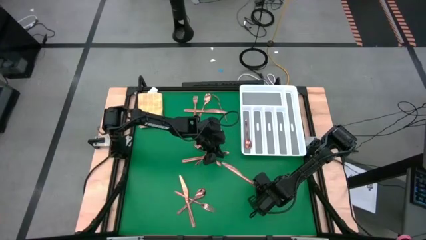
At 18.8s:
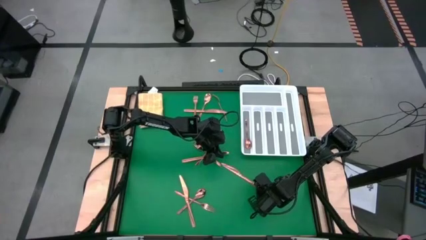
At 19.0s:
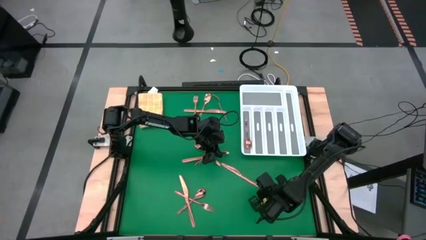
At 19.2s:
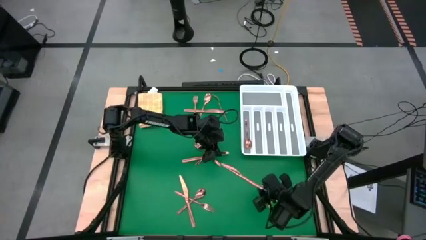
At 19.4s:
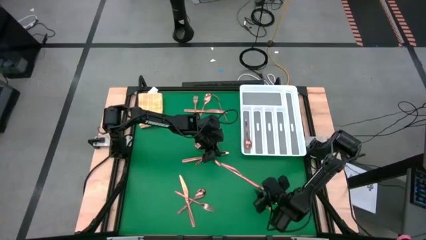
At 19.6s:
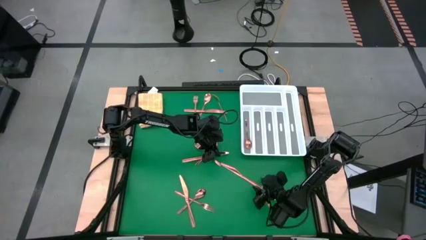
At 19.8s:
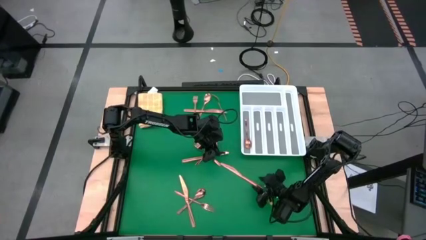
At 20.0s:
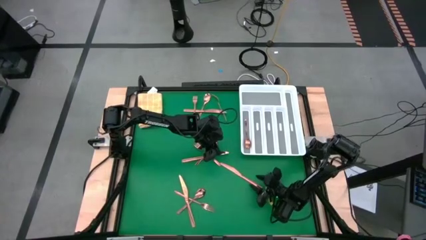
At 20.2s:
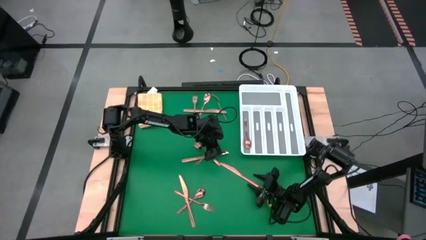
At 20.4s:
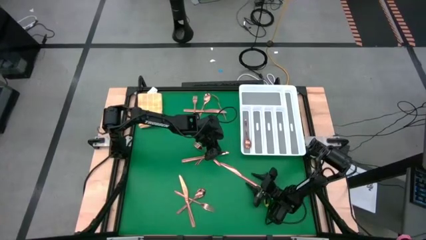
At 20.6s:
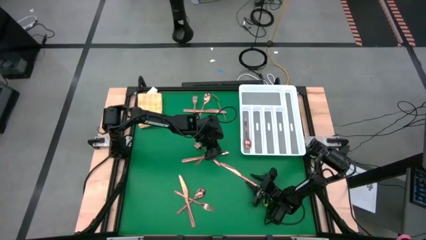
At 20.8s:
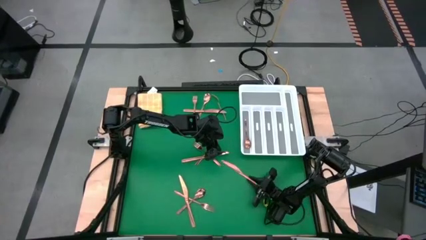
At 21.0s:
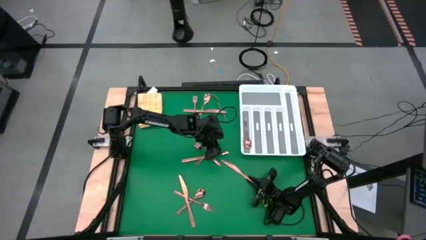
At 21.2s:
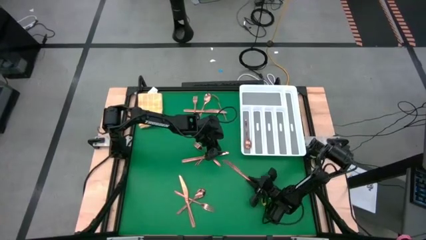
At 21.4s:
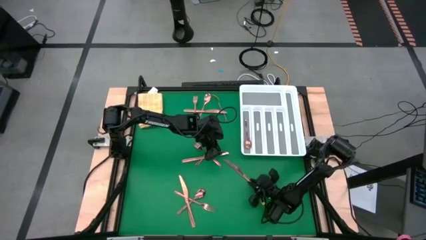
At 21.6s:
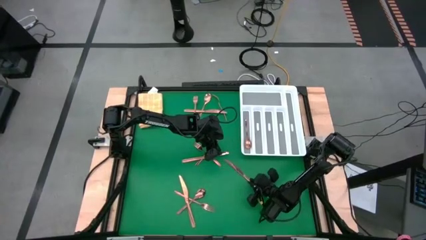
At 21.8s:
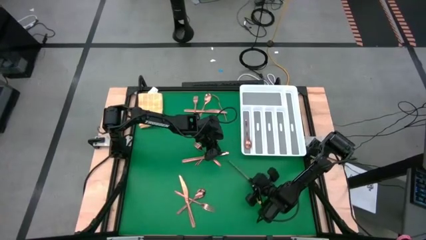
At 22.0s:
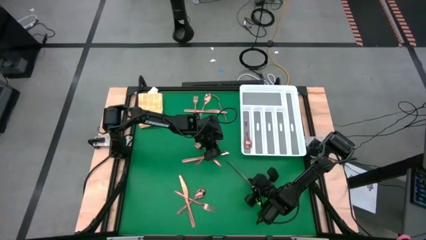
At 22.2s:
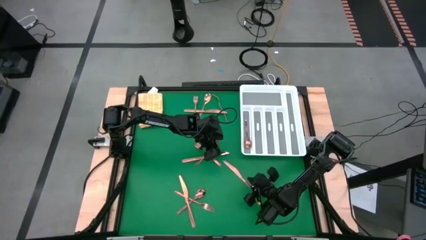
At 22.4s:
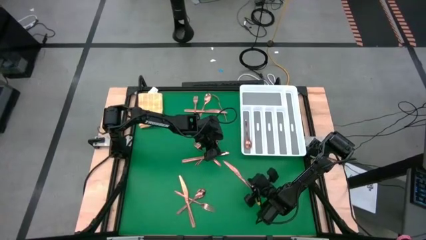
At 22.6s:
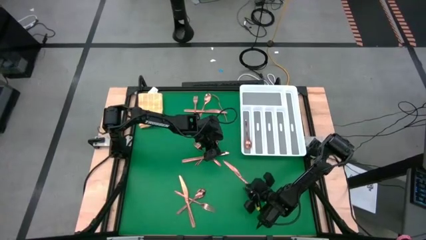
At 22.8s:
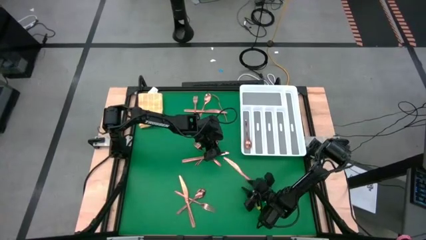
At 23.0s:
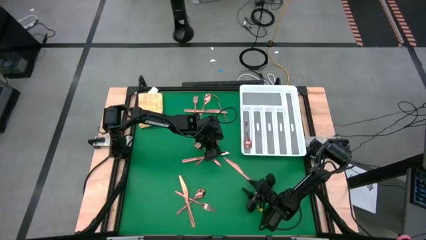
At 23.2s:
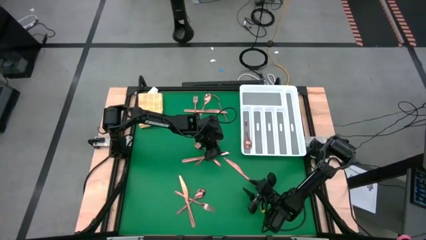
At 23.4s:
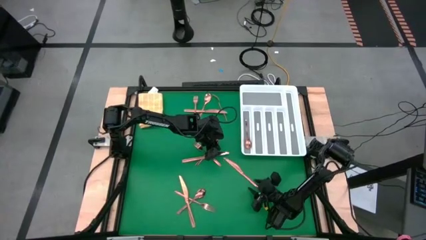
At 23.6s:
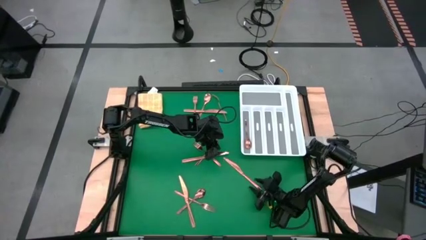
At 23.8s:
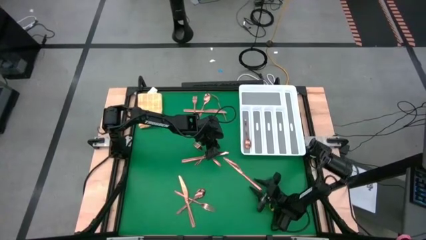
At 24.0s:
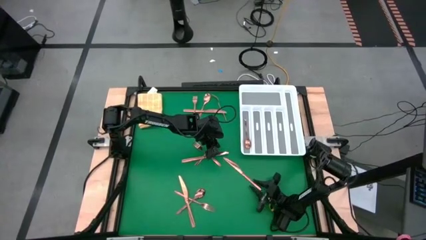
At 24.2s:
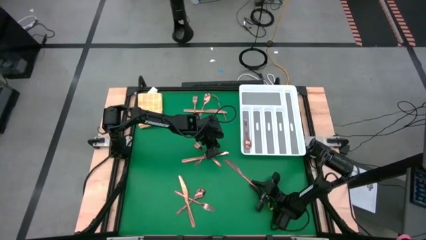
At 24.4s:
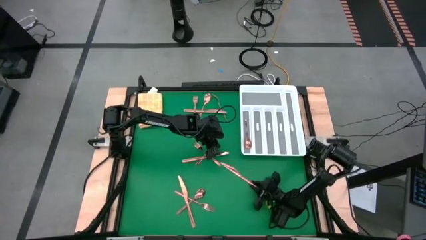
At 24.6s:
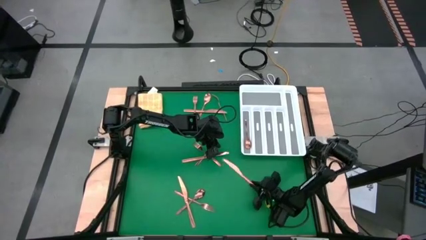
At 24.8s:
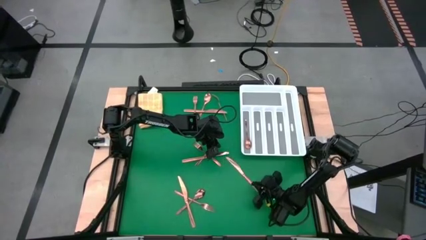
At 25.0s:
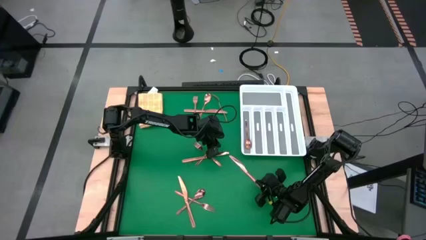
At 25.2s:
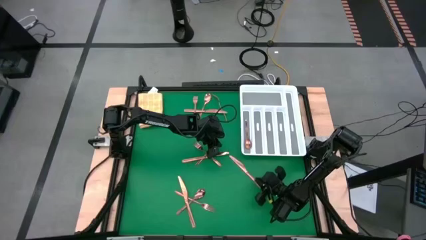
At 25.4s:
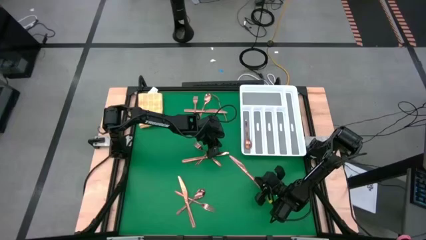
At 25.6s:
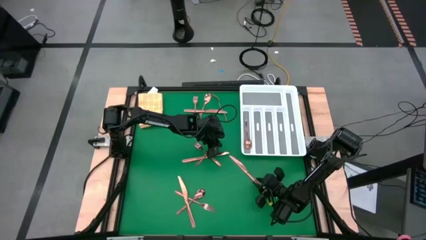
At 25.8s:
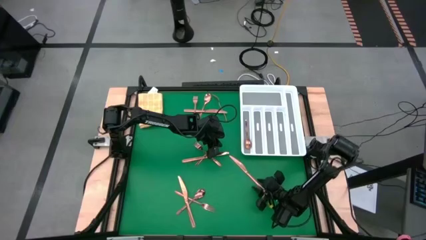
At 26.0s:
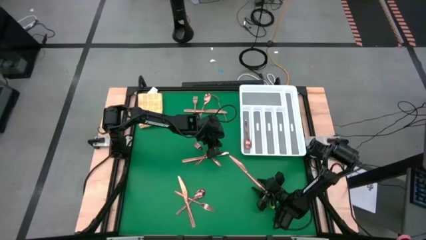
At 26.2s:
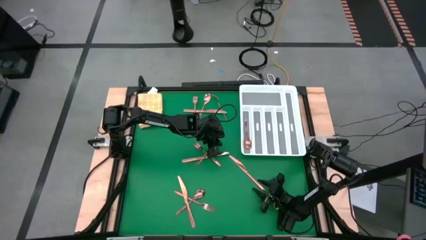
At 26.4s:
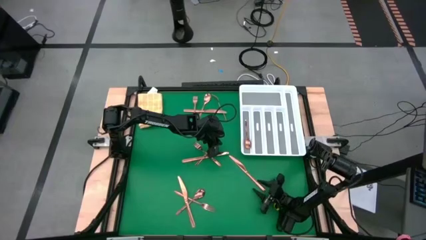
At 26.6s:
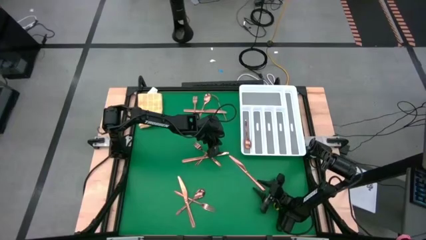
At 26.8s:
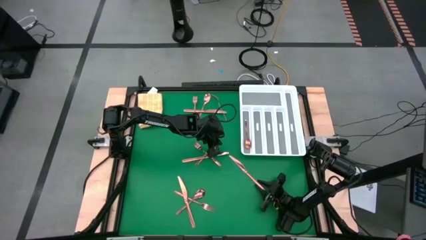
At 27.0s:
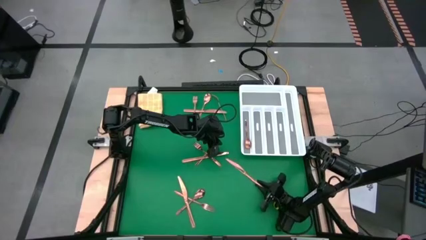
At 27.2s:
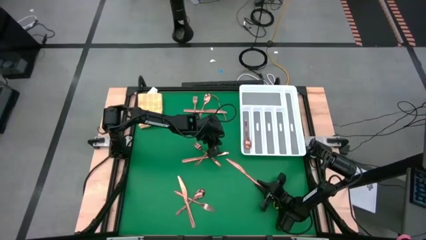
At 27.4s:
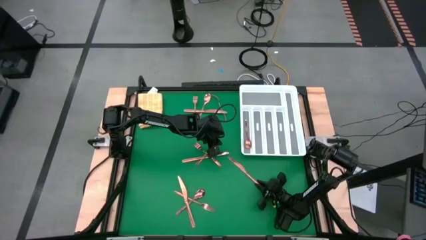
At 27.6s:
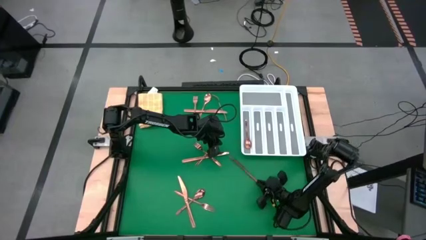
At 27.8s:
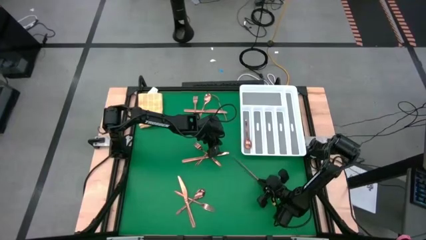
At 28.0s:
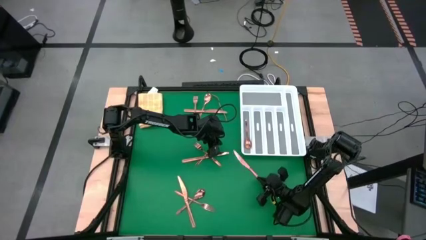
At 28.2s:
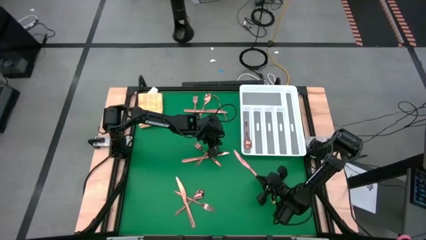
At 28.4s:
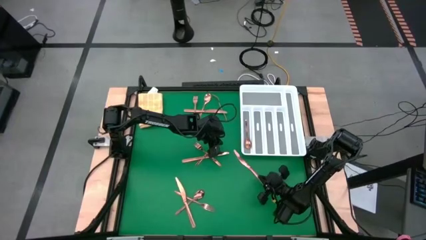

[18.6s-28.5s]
Task: Sort silverware
Put the bottom right gold table knife into the silverware organizer

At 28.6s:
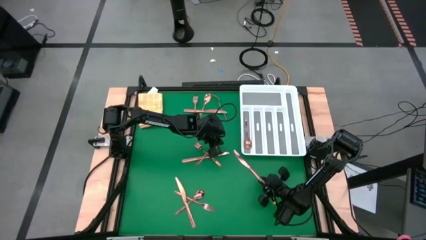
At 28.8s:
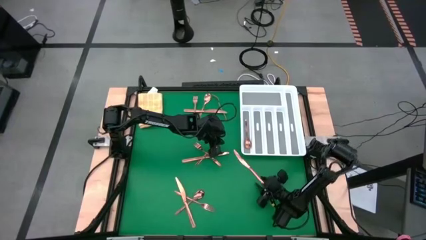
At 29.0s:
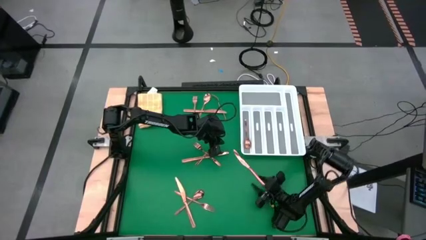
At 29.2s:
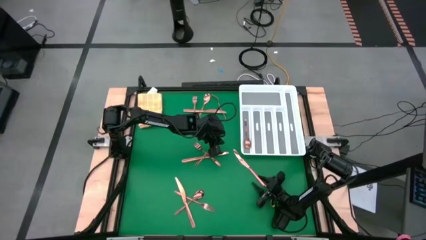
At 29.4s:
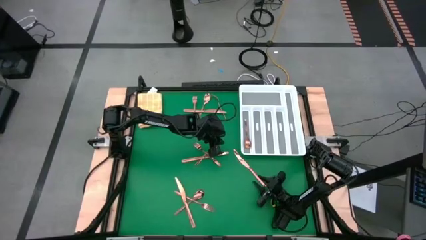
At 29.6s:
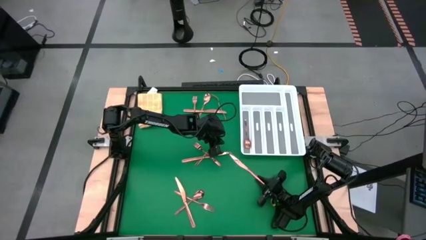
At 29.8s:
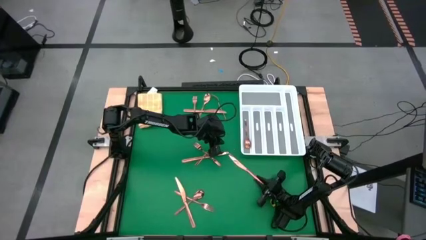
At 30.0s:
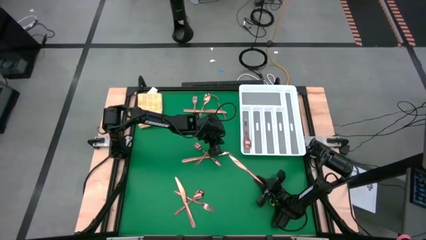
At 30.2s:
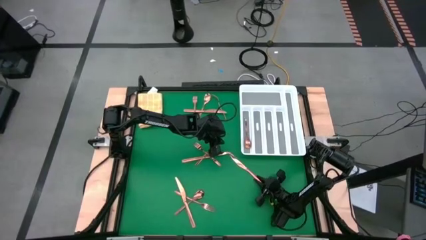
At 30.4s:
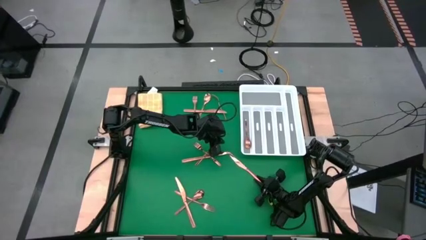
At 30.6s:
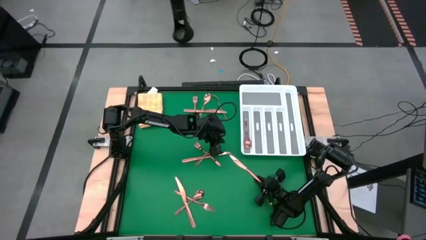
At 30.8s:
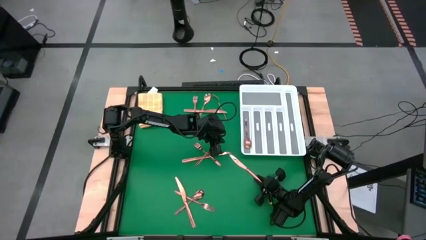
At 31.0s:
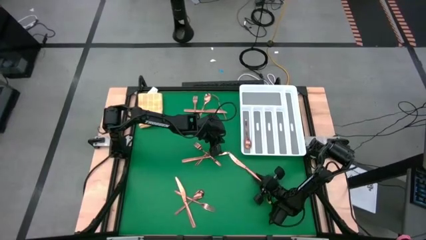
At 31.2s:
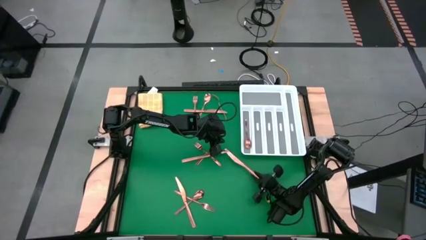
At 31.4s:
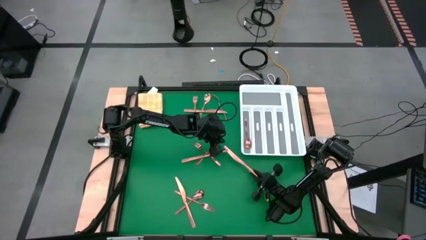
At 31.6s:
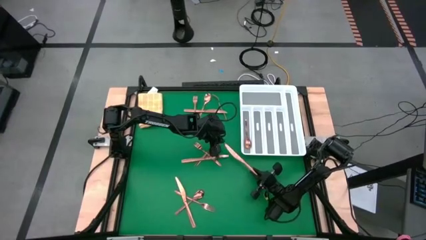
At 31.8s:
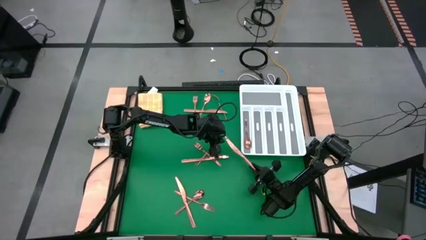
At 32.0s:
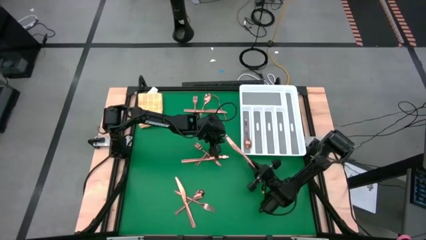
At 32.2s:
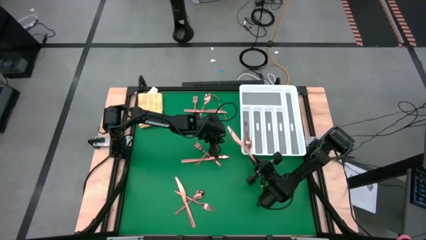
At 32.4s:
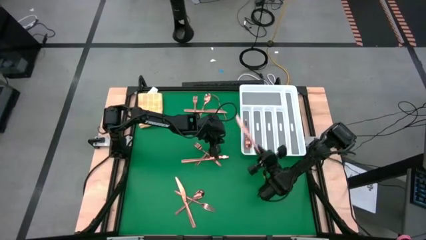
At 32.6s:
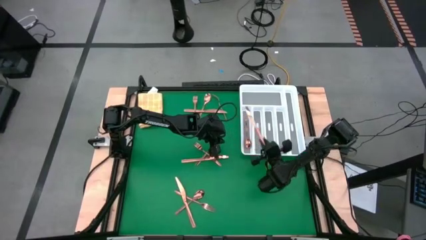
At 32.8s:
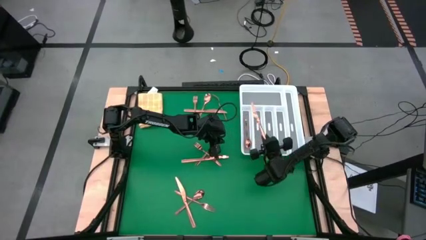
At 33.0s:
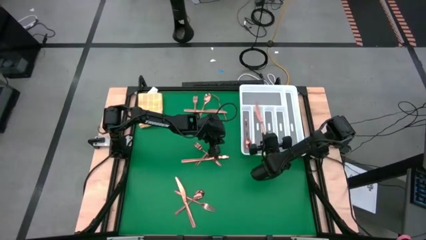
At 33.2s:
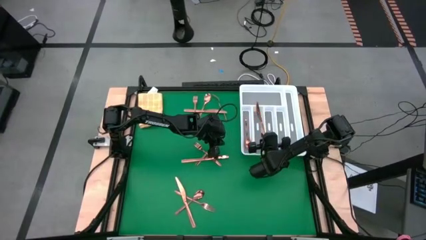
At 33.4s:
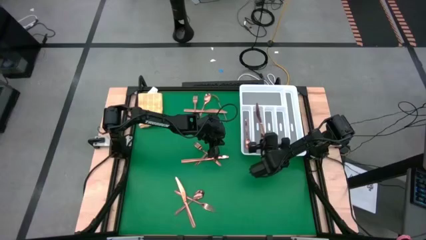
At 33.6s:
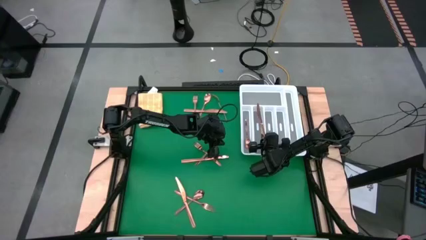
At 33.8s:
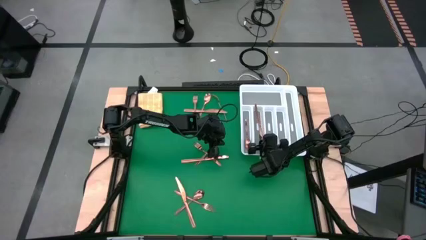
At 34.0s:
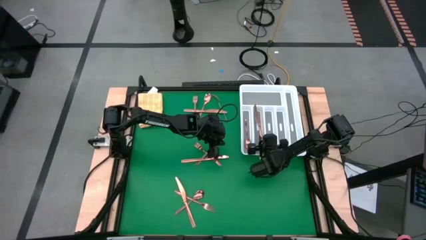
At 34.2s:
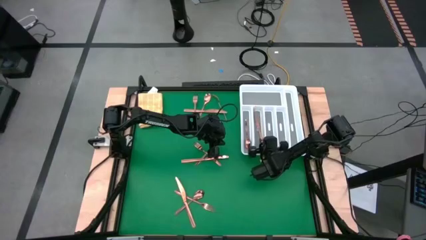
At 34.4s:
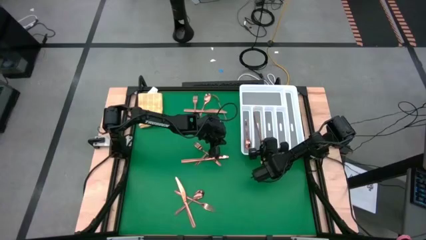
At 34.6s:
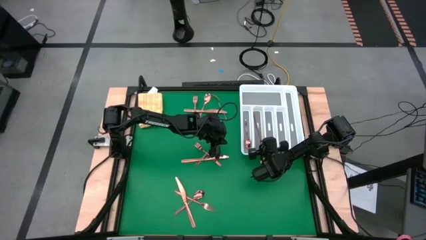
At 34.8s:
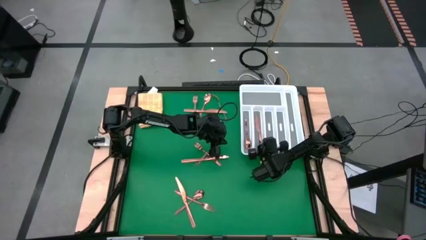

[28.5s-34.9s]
Put the middle right gold table knife into the silverware organizer
